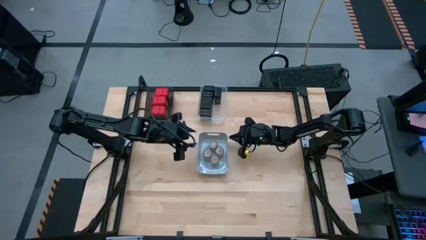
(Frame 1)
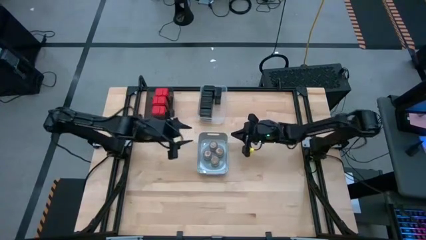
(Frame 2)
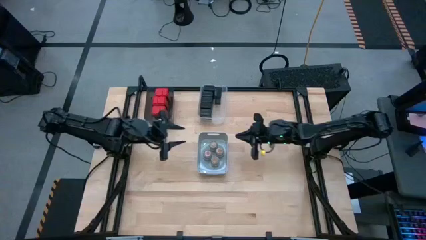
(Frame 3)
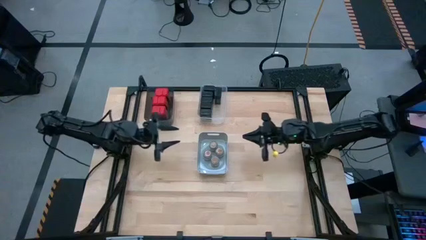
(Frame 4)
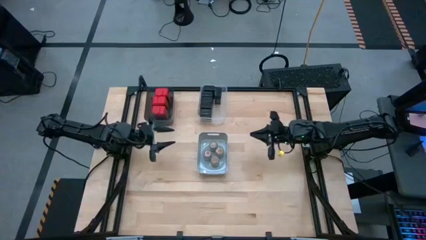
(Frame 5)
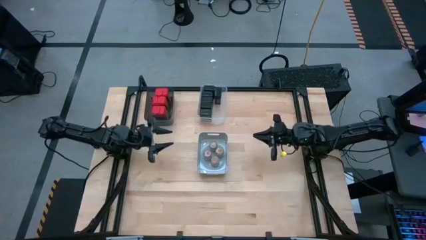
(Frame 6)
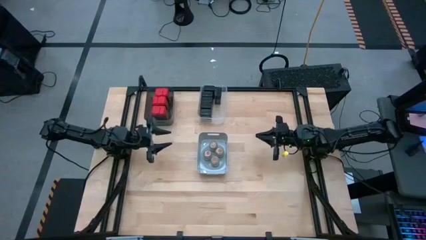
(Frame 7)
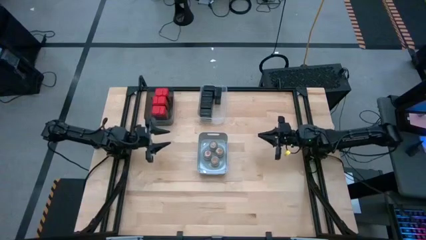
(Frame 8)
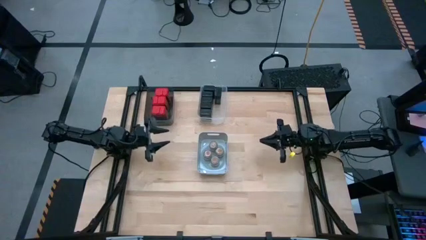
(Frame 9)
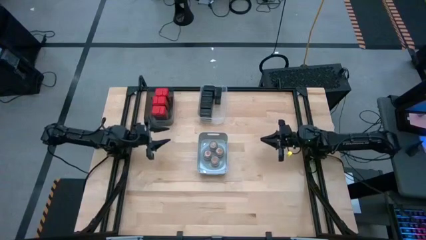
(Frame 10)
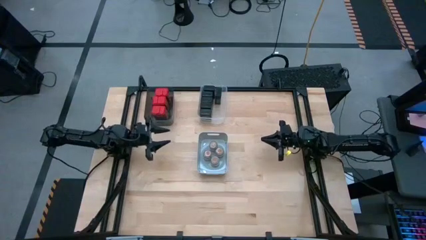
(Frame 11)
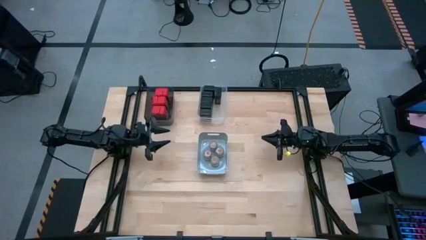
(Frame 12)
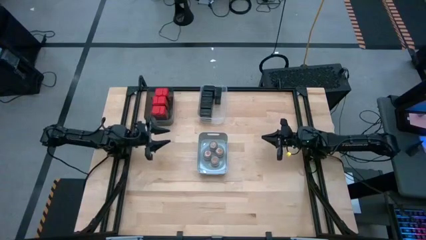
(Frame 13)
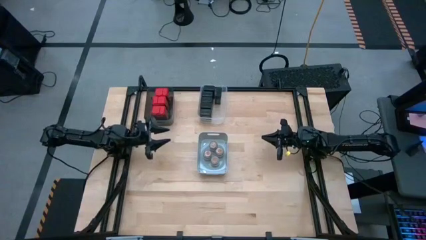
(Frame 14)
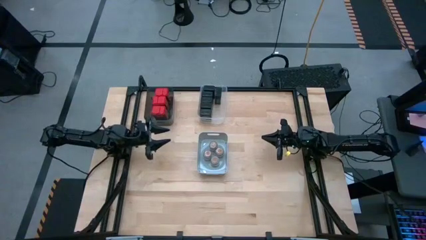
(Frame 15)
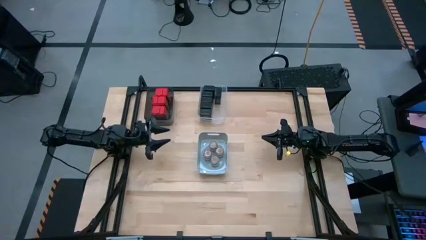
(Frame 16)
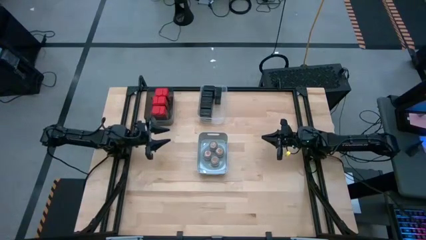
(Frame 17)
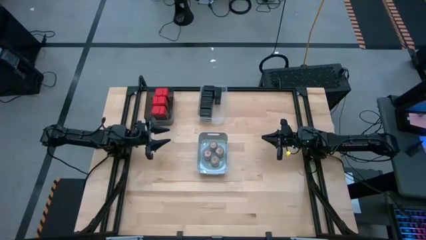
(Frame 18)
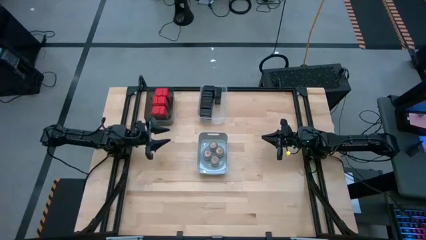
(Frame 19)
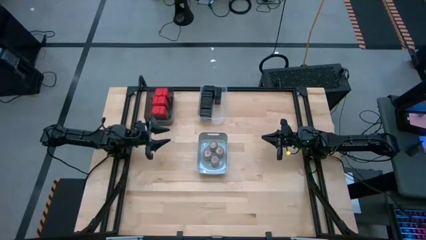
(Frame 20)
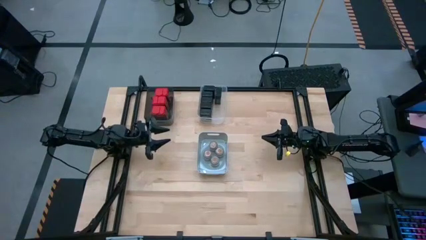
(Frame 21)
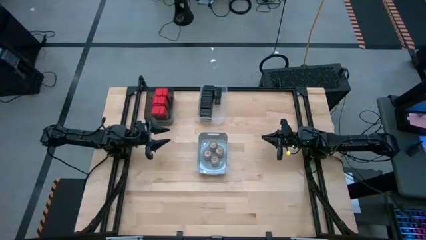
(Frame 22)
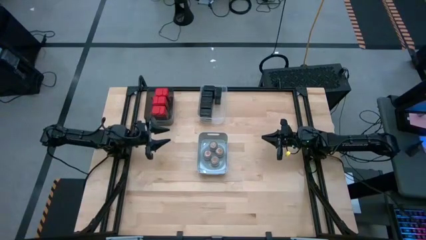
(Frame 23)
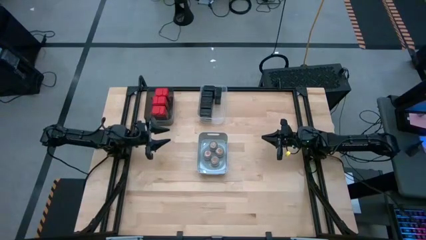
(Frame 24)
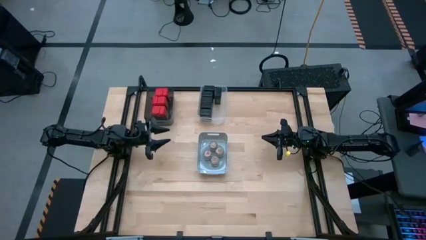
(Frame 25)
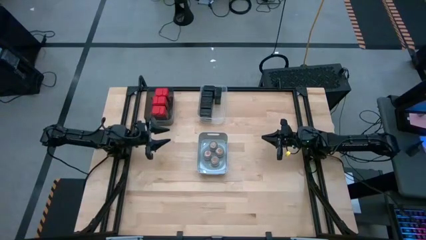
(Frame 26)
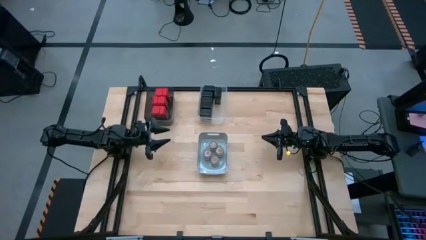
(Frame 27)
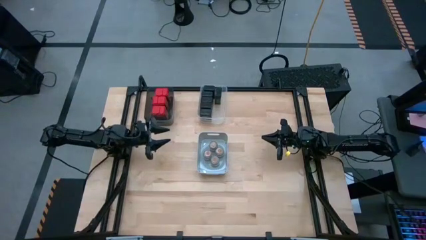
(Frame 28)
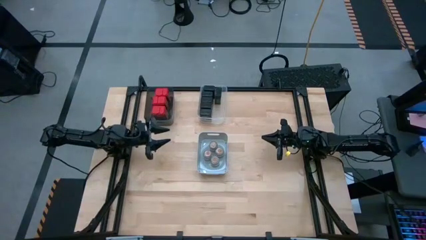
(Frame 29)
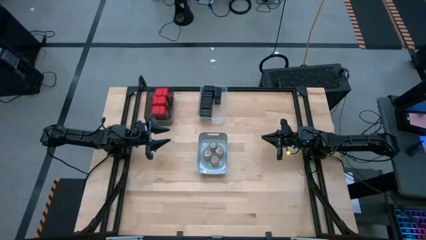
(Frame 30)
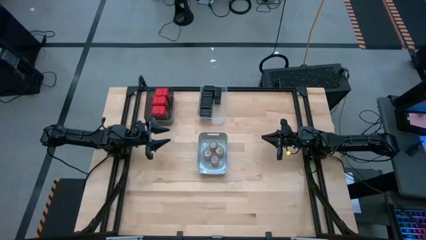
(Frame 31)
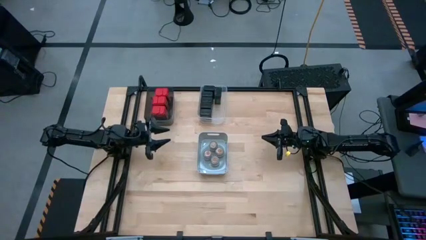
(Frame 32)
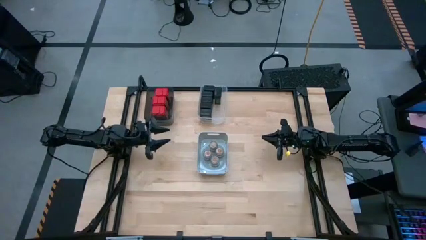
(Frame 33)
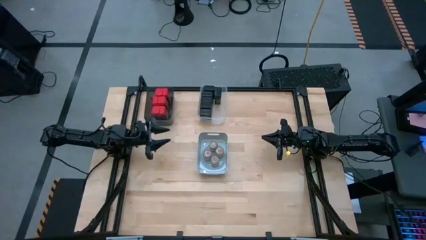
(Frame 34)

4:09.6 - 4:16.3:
Task: Sort spices by type
Return to Home Position

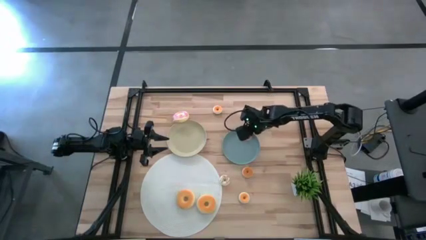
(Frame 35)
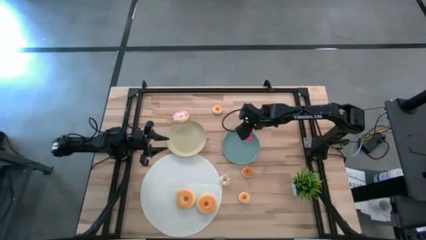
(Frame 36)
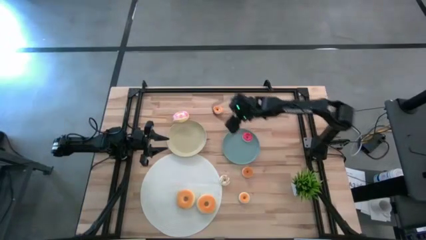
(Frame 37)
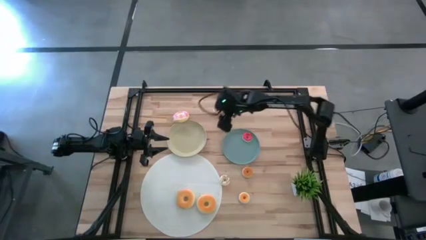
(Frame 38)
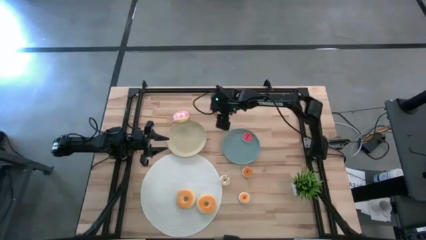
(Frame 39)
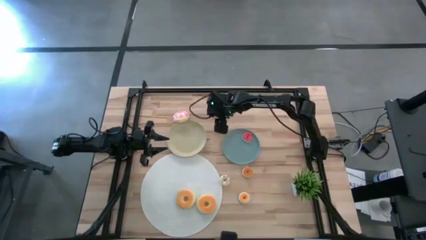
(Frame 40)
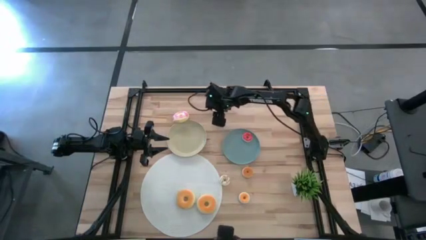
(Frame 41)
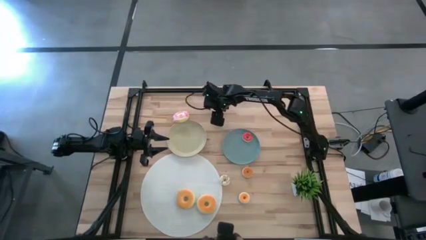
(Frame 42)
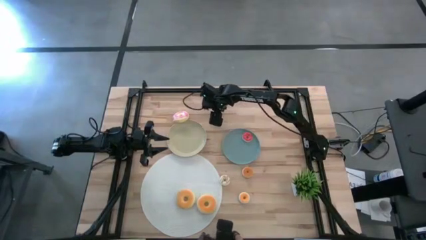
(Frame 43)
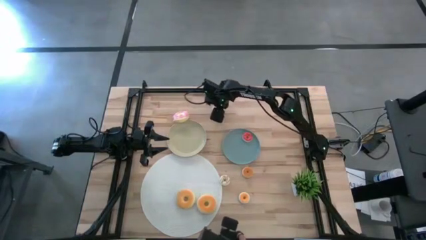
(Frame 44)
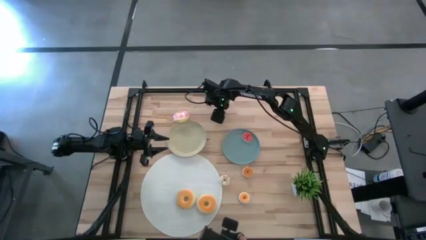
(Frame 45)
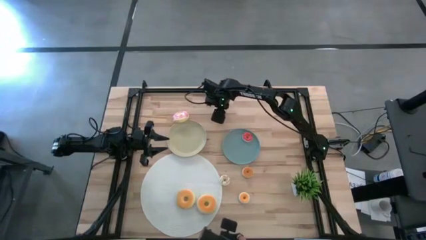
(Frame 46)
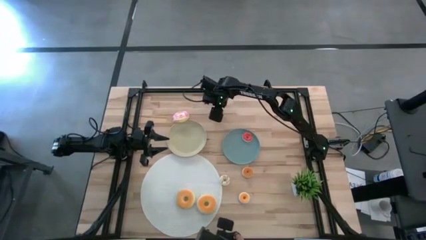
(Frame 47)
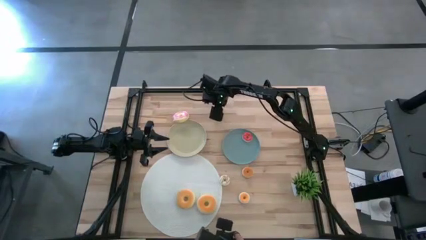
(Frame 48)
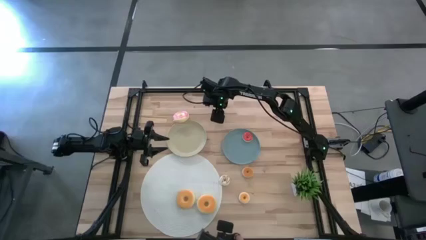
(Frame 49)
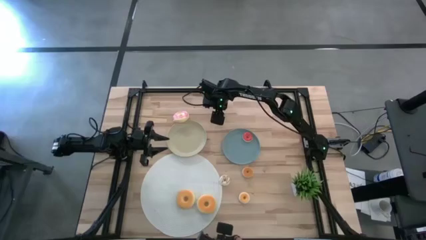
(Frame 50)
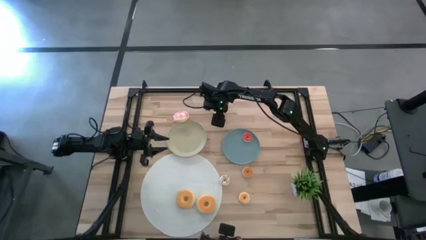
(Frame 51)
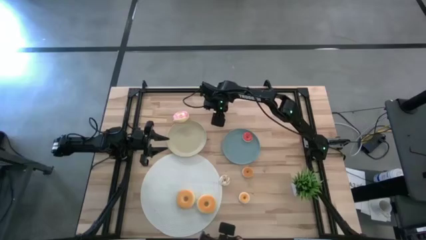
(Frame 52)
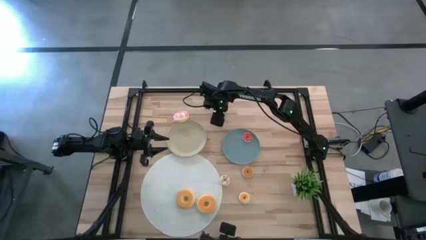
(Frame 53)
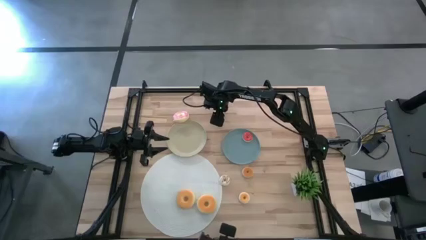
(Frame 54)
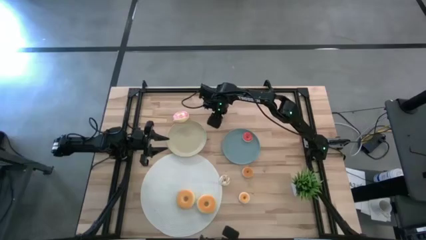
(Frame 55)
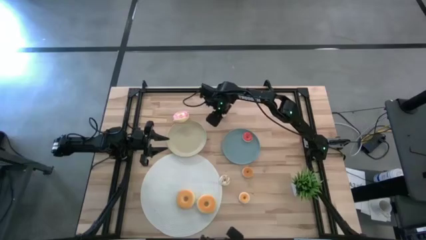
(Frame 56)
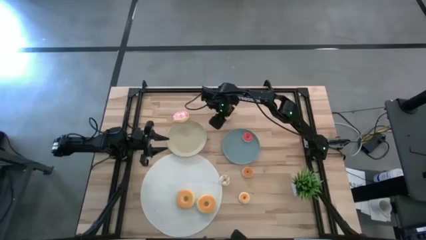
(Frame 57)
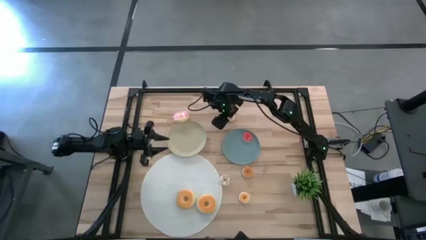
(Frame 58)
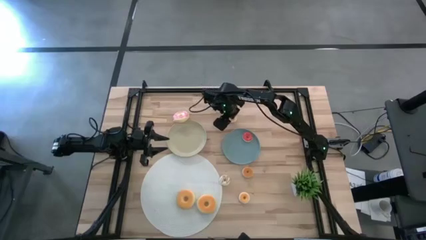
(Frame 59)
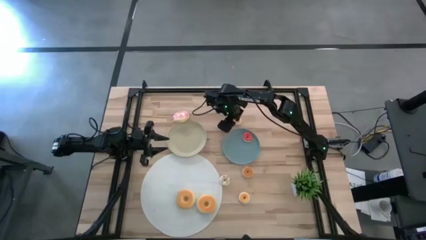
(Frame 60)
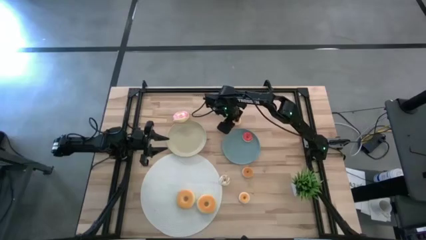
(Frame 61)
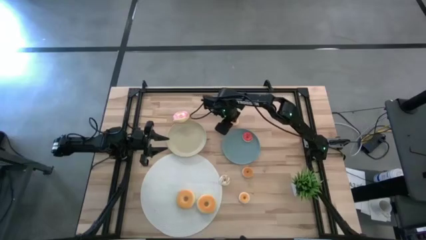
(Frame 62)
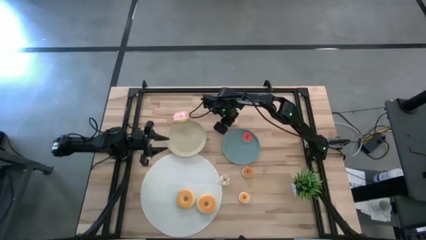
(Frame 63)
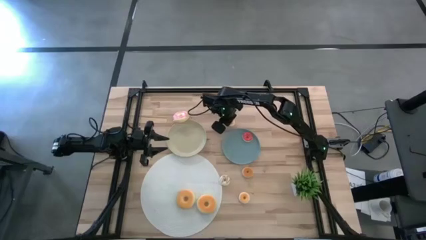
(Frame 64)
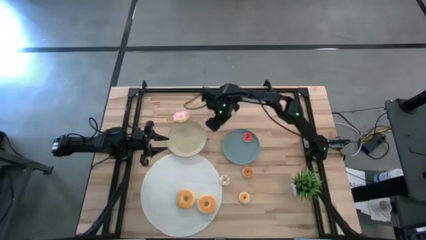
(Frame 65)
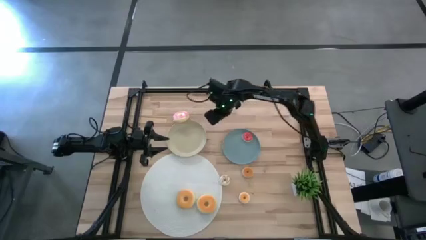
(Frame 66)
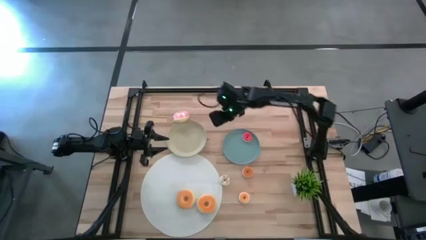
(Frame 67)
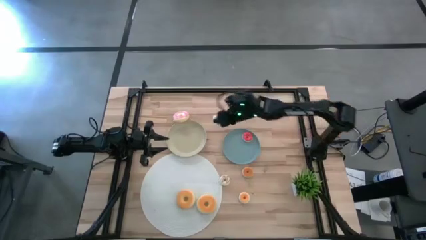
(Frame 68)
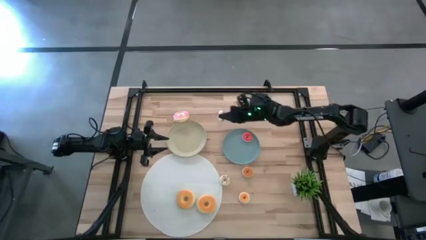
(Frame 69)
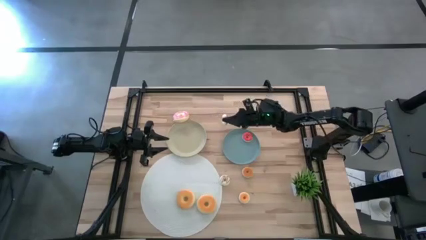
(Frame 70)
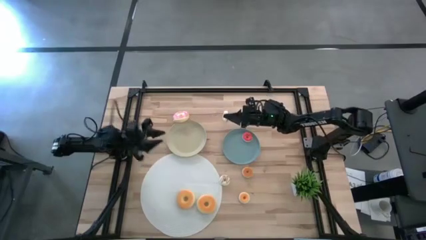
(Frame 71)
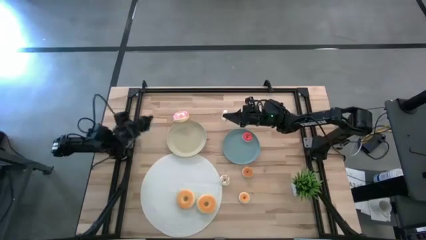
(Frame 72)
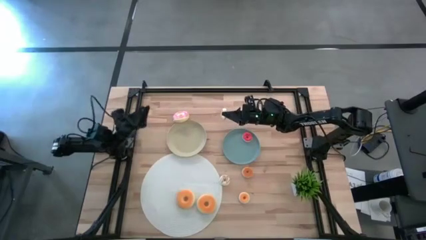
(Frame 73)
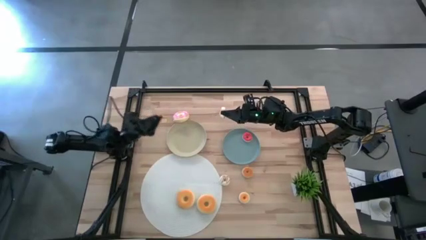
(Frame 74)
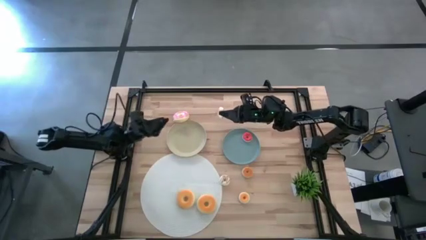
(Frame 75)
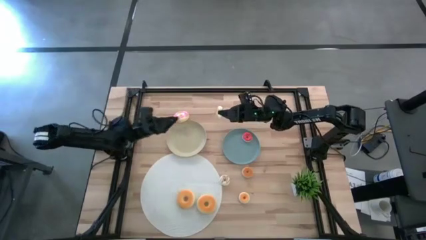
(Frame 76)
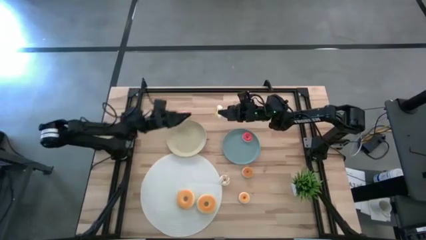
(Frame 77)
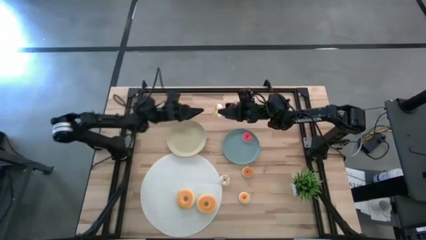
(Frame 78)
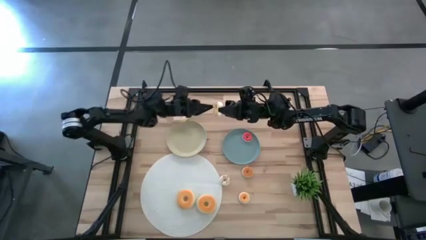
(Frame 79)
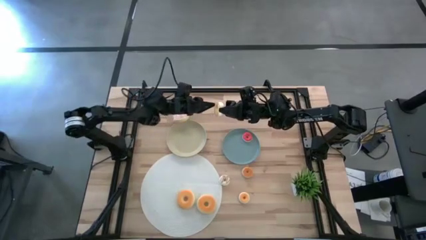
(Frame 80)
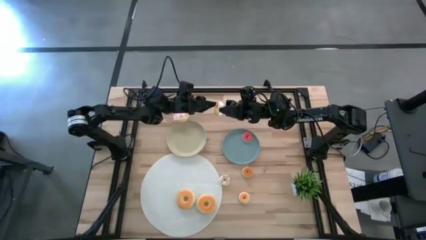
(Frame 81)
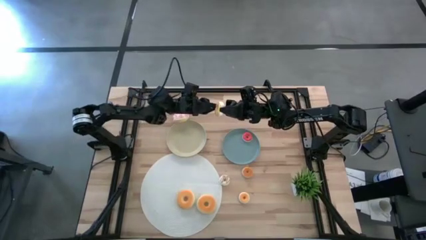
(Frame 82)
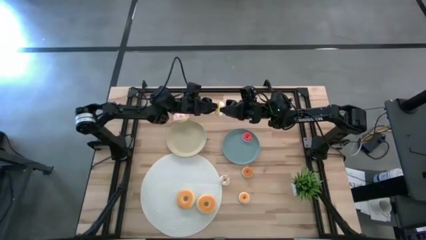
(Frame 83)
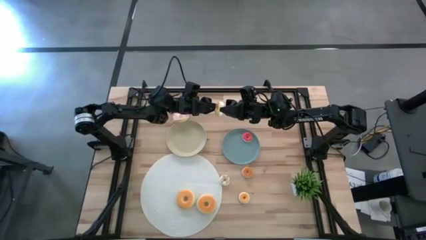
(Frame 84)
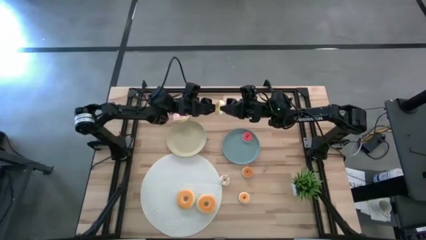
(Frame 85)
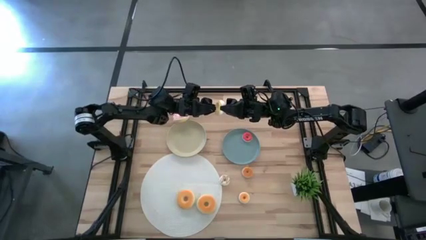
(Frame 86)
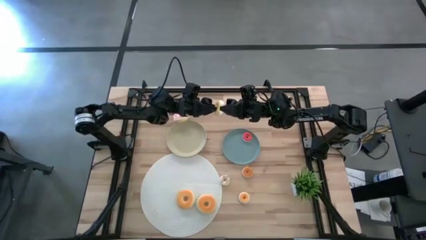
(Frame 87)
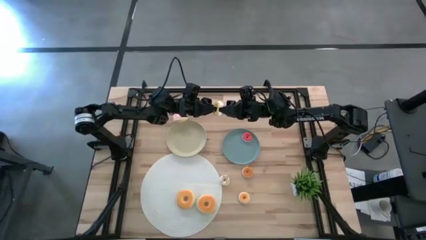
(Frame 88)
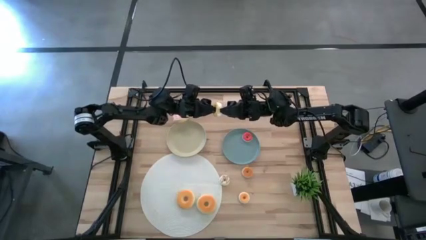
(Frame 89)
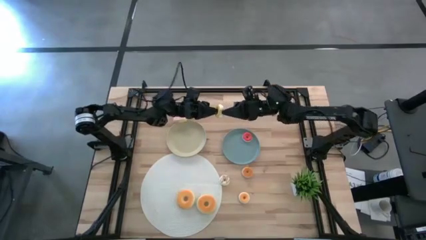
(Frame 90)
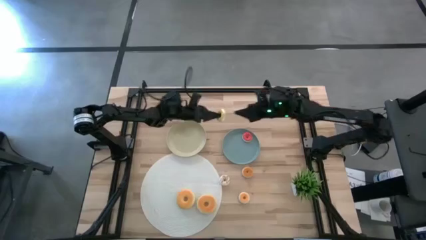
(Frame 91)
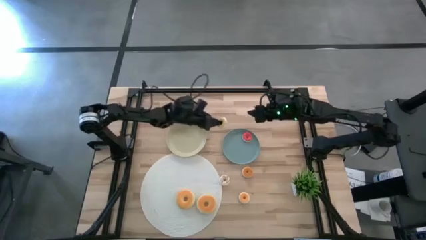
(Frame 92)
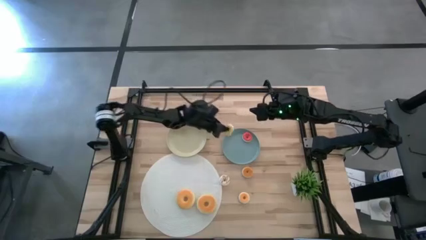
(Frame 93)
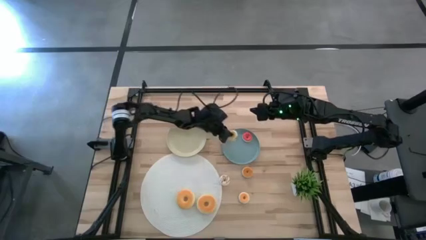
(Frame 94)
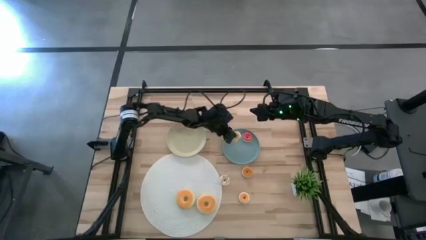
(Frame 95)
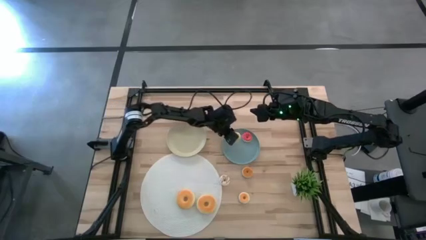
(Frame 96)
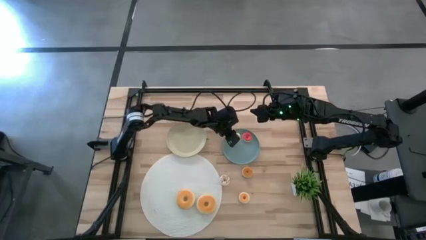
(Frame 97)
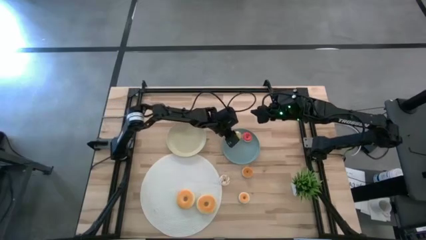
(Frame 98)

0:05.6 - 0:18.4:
Task: Pick & Place donuts
Put the small yellow donut on the blue plate
